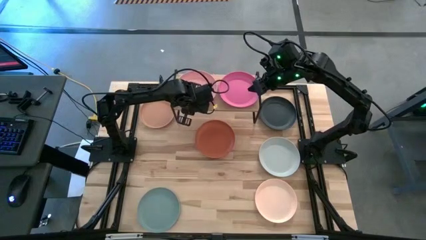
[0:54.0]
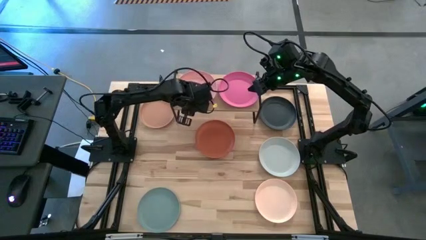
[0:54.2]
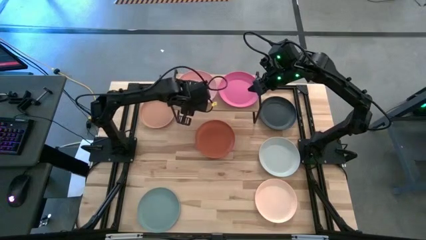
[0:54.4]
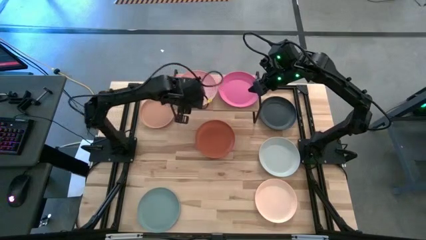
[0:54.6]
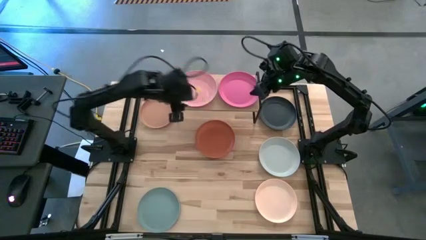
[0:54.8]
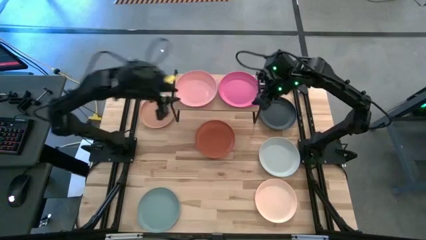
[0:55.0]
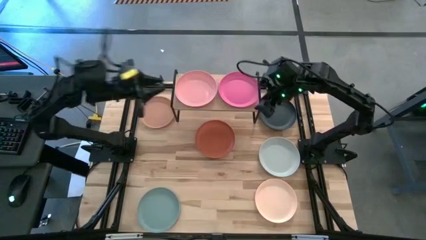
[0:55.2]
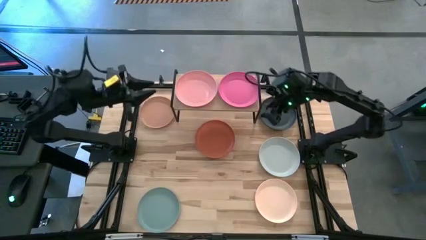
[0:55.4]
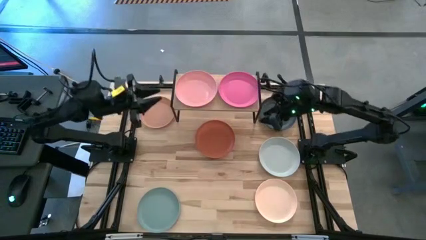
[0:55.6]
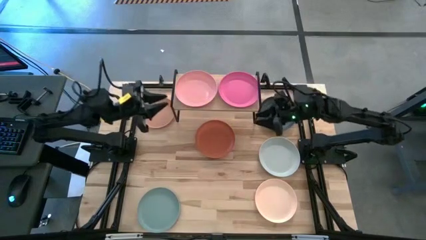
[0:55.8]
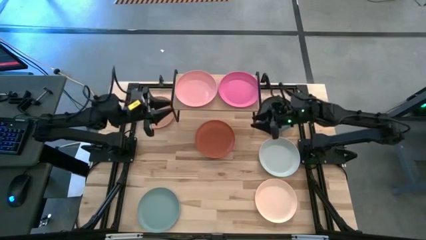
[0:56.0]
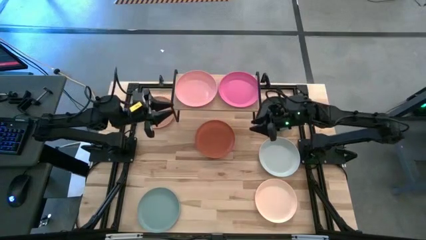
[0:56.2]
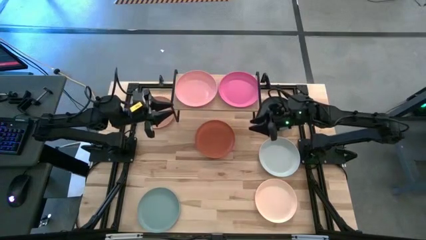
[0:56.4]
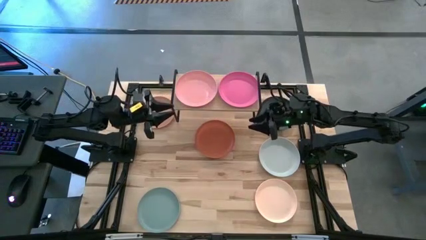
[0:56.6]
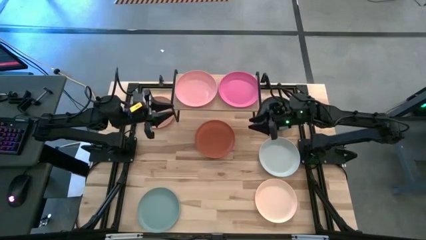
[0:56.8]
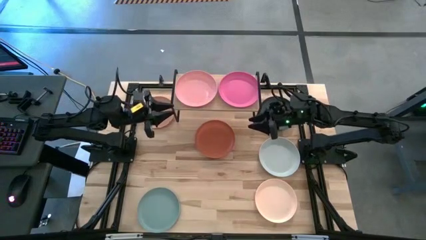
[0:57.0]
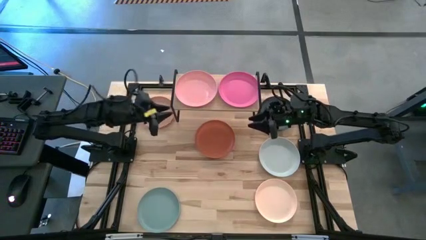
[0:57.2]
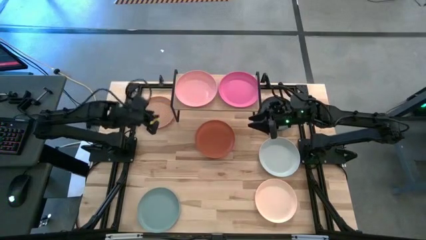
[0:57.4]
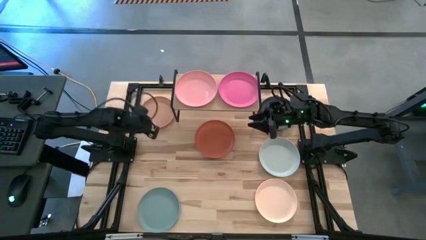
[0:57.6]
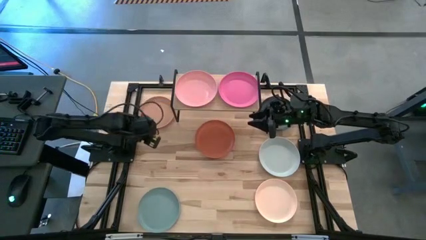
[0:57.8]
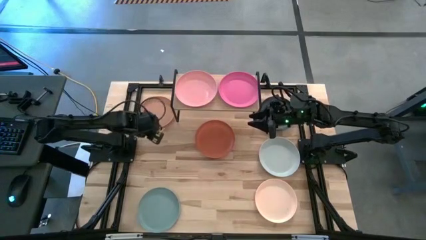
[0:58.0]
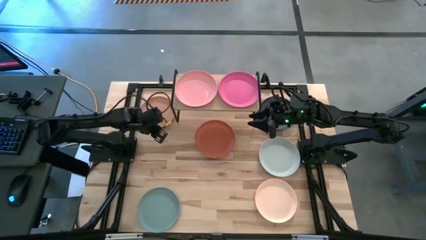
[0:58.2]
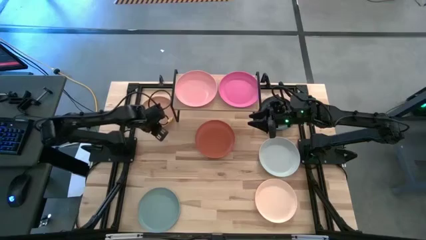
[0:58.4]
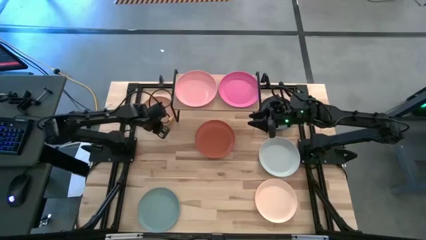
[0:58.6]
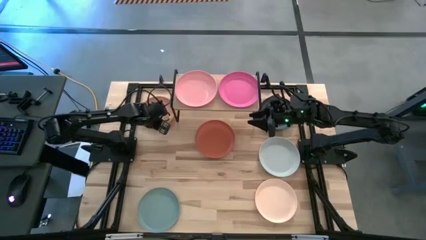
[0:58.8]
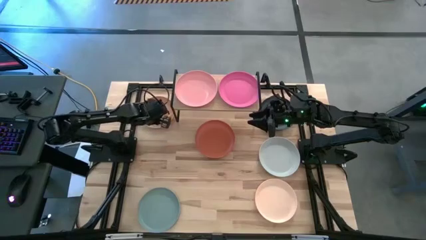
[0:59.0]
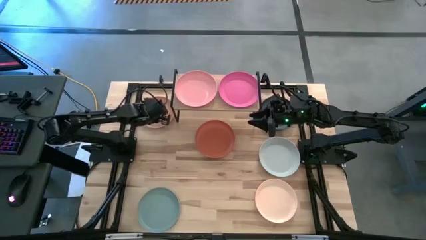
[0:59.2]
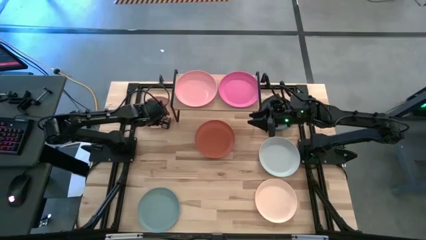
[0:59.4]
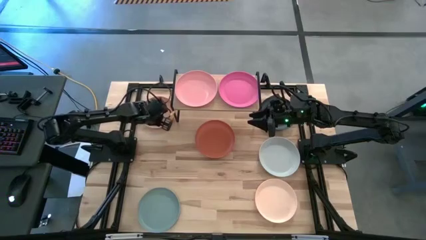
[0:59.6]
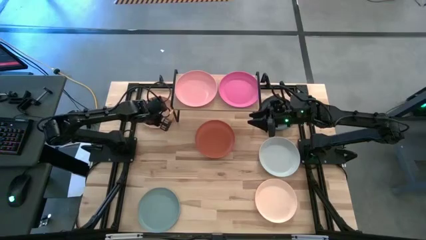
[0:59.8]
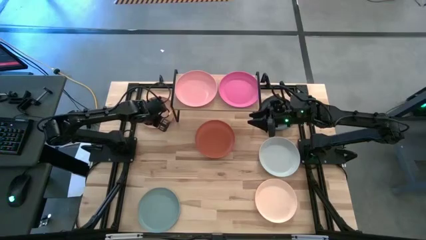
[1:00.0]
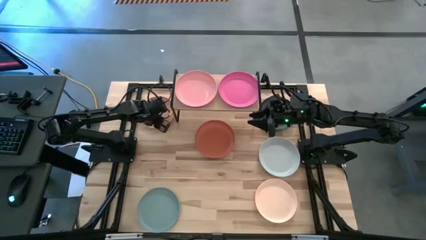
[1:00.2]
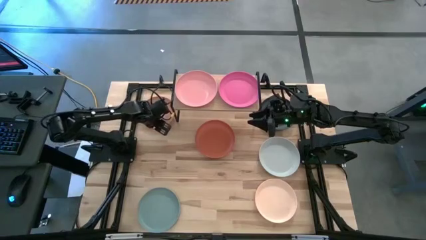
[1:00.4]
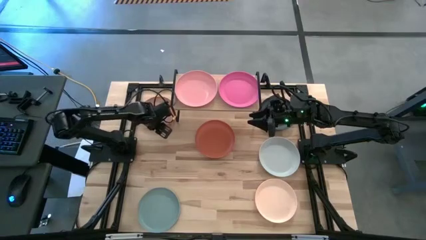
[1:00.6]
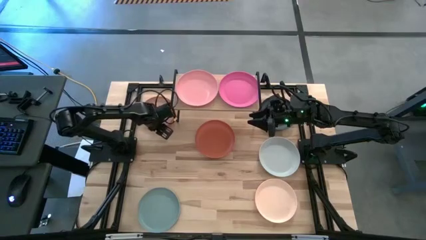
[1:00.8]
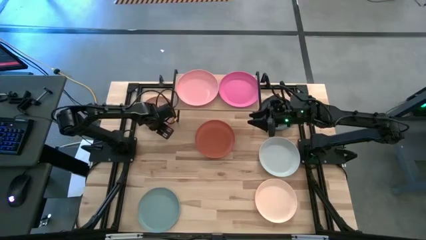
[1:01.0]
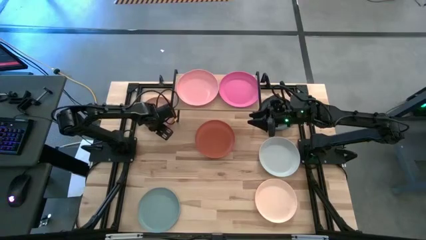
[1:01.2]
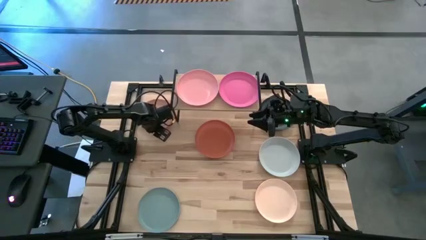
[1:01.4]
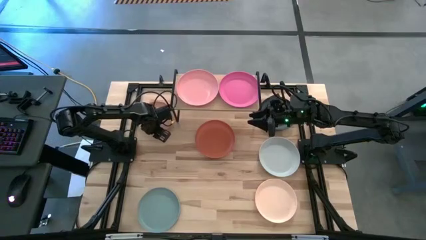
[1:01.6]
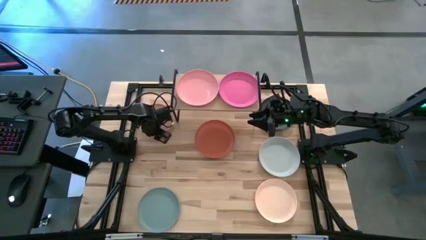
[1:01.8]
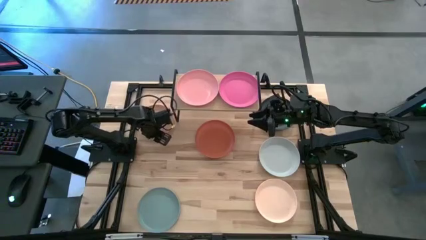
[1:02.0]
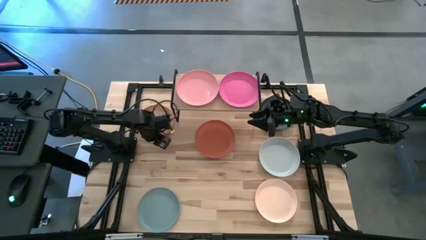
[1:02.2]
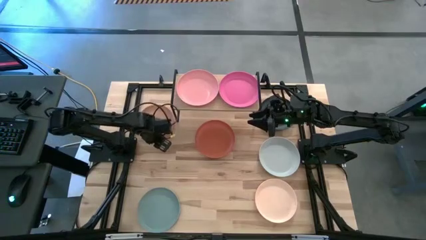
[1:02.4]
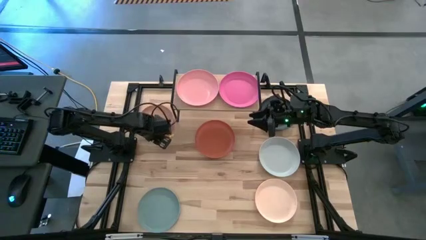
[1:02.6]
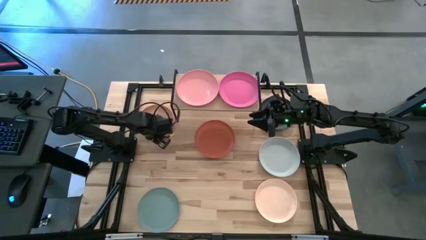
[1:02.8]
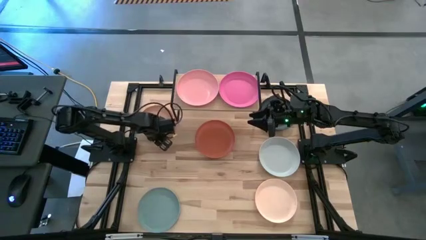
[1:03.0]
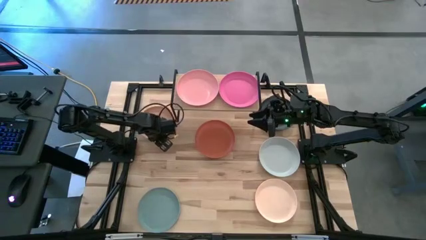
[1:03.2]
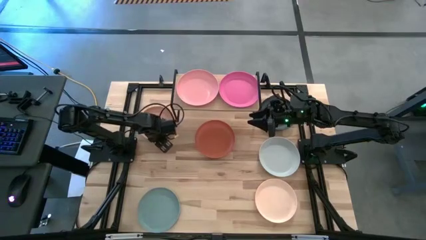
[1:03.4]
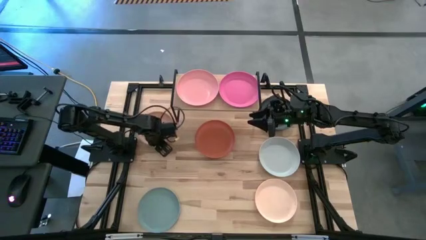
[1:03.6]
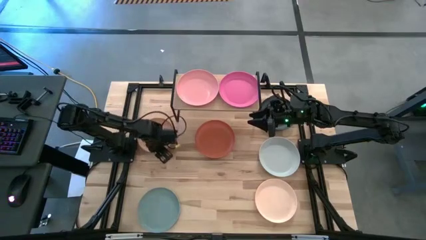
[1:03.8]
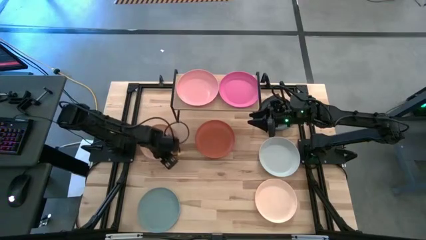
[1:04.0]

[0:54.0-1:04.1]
Task: Place and stack plates onto a shelf
Stack the light brown plate on top of the light pink plate

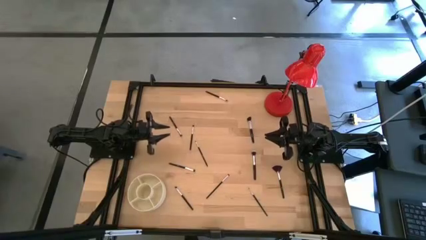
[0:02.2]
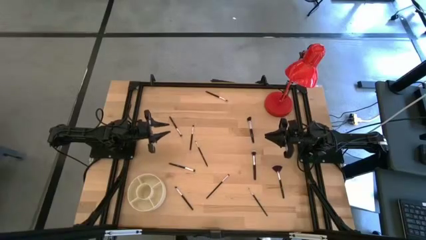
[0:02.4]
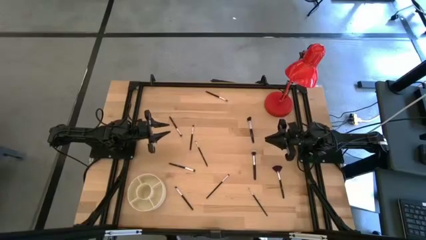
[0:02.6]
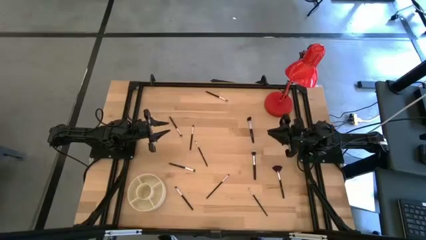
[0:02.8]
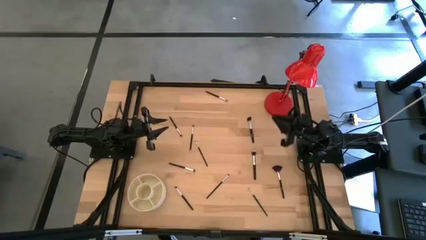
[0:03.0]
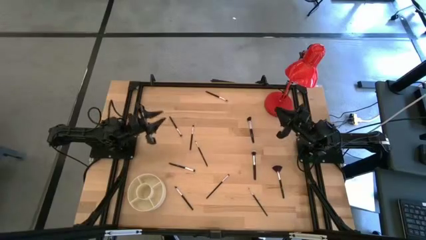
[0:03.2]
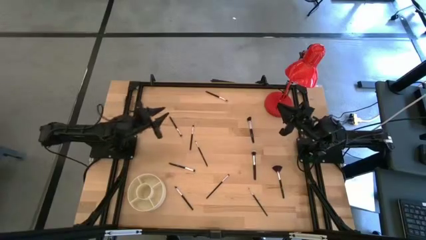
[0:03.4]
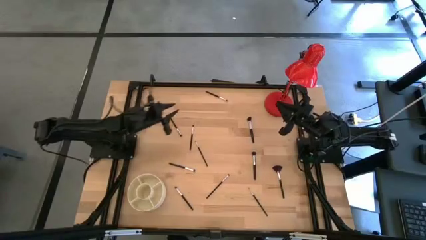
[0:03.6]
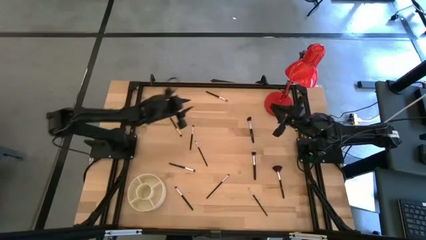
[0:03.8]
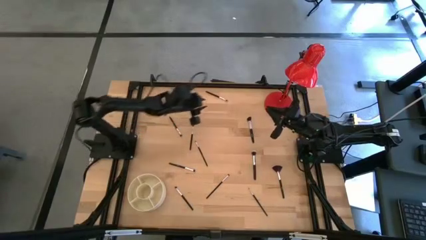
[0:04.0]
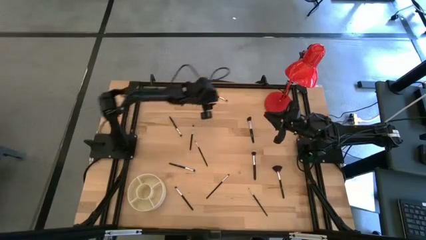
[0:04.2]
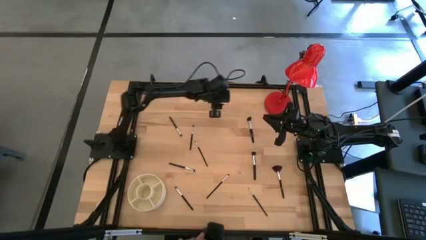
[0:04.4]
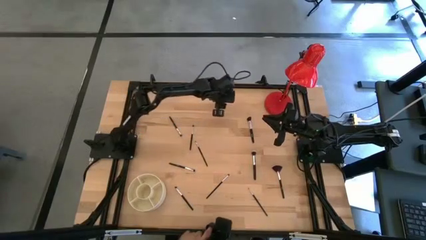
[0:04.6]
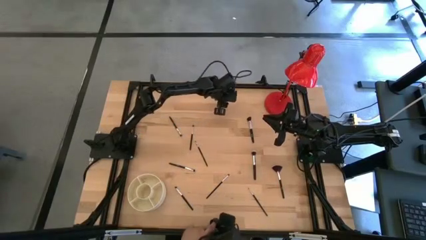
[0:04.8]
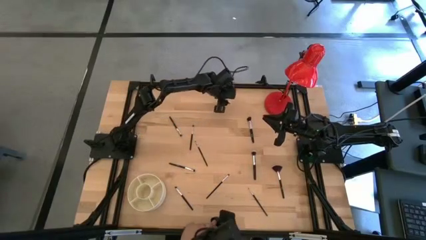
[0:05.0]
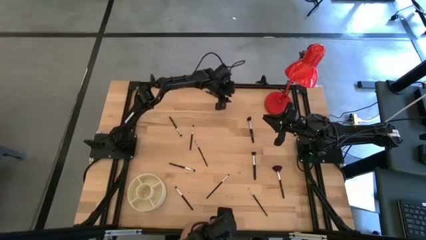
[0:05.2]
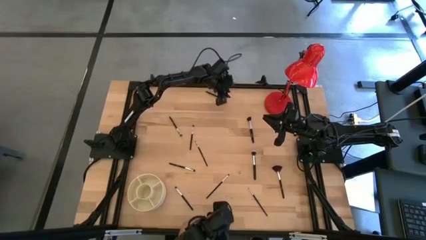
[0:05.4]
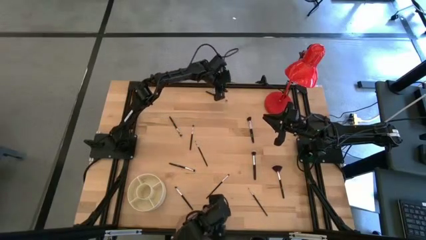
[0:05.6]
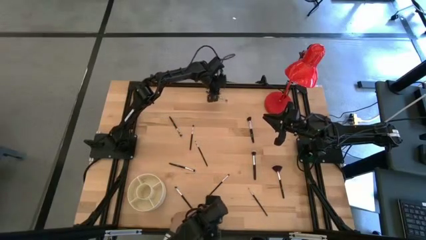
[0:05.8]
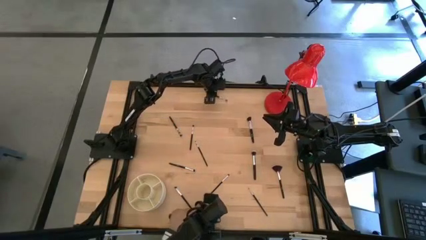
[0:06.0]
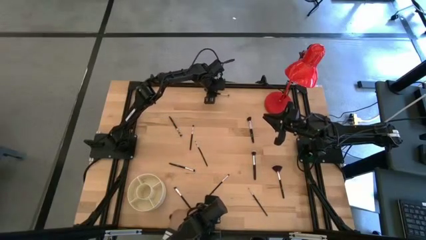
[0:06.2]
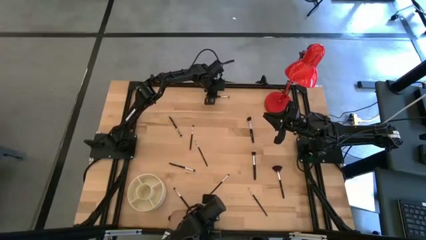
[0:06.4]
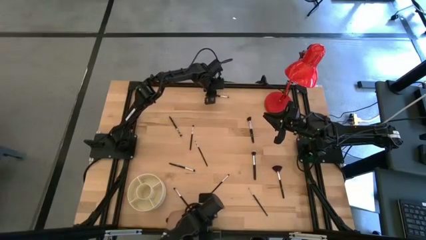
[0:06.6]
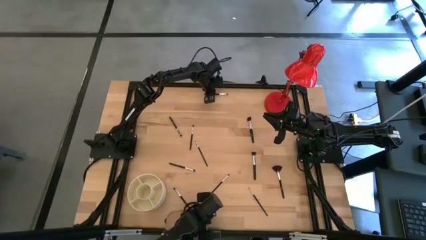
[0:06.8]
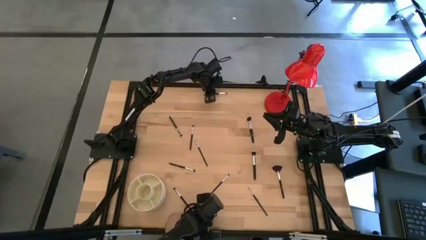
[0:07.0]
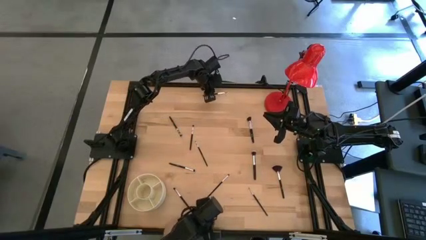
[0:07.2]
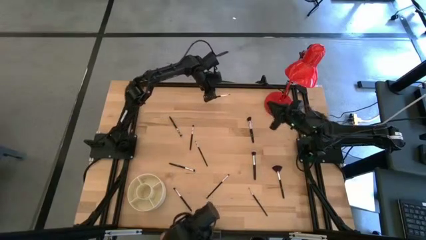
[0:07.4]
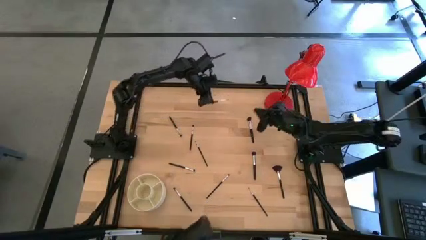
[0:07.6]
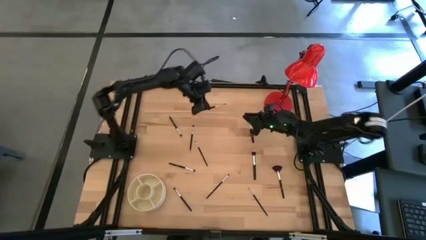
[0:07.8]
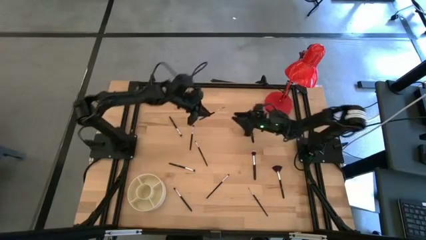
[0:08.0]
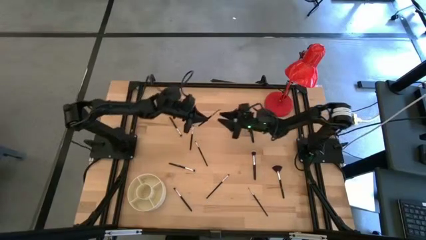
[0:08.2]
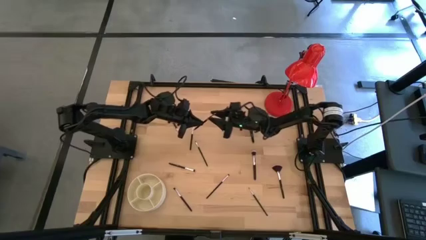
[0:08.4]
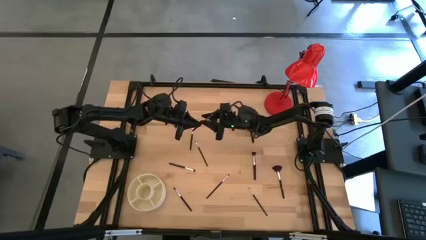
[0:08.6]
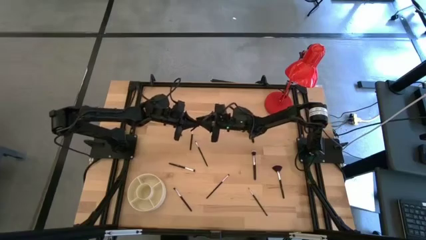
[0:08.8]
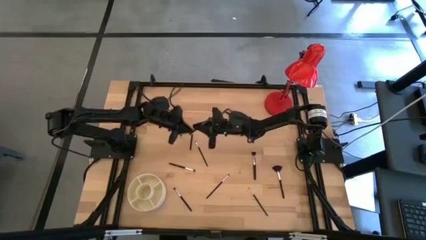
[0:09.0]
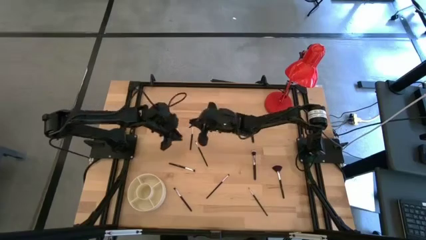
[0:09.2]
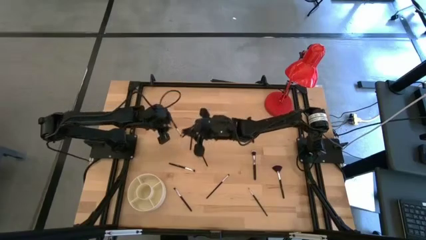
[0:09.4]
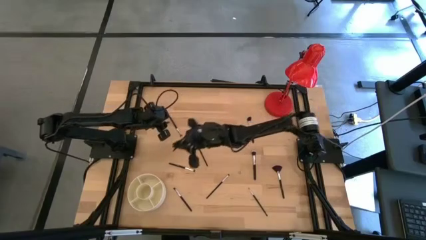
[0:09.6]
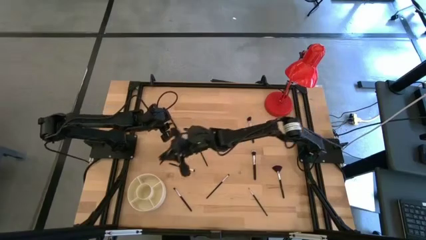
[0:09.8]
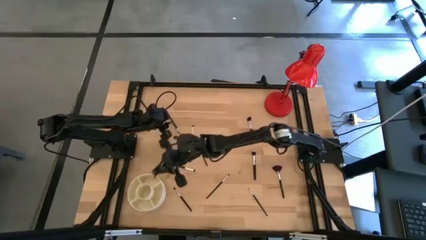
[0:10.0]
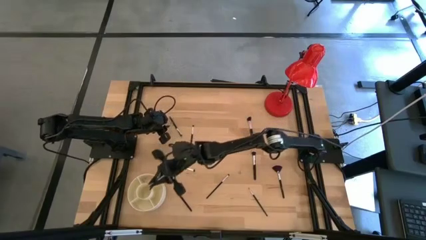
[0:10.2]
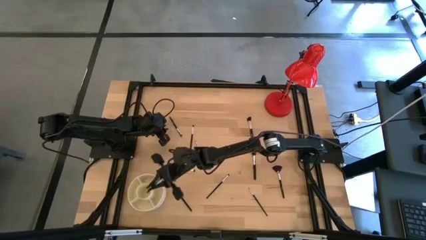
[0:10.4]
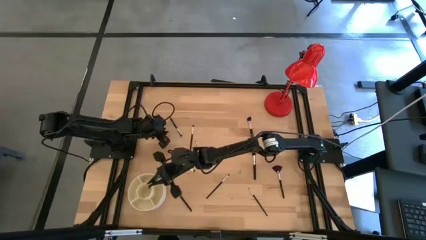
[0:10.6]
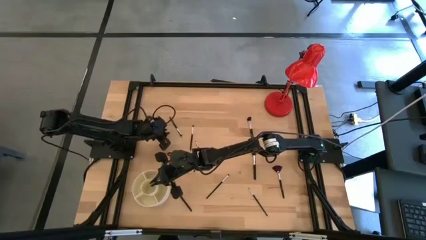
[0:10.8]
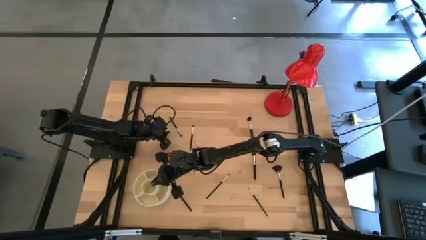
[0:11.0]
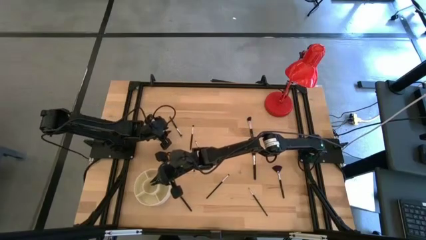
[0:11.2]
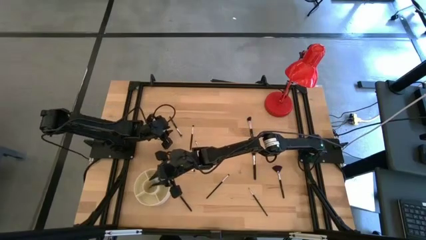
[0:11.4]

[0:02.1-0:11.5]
Task: Put items in baskets/containers
Put the black eyeshadow brush into the white organizer
